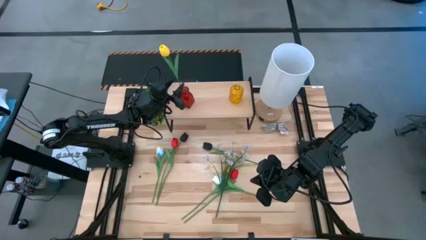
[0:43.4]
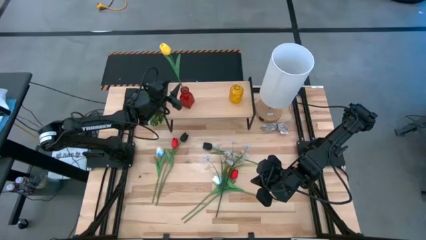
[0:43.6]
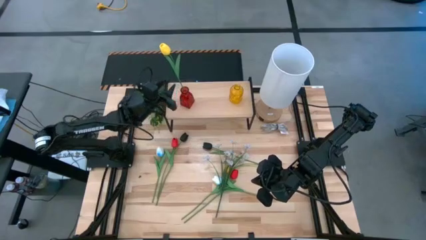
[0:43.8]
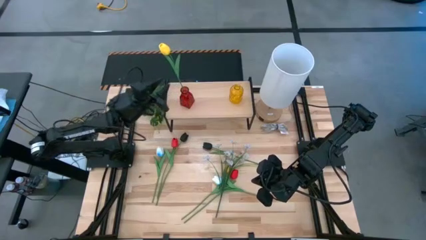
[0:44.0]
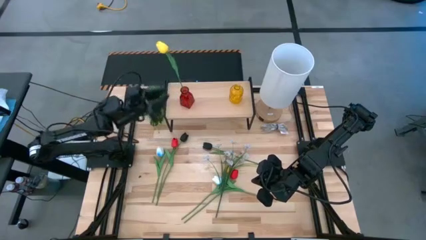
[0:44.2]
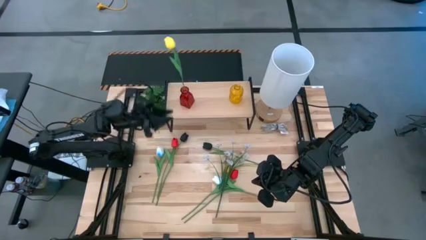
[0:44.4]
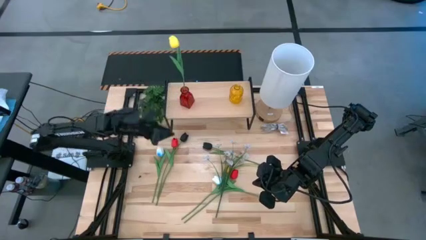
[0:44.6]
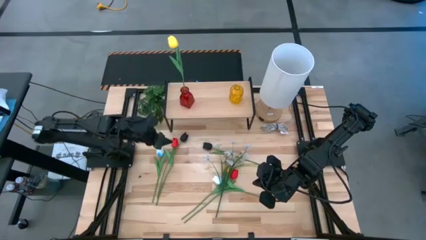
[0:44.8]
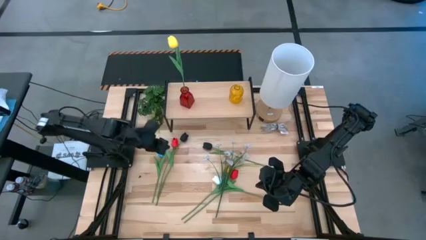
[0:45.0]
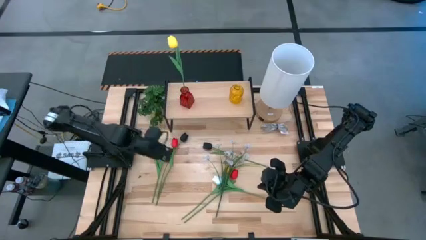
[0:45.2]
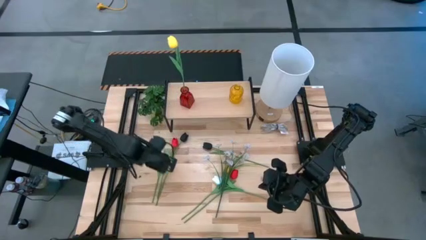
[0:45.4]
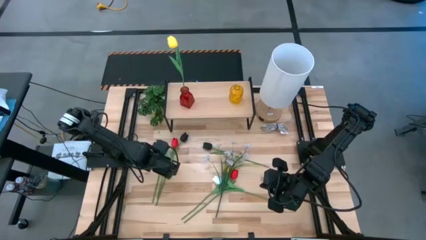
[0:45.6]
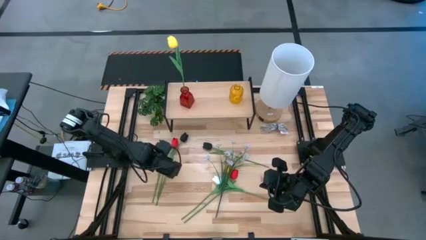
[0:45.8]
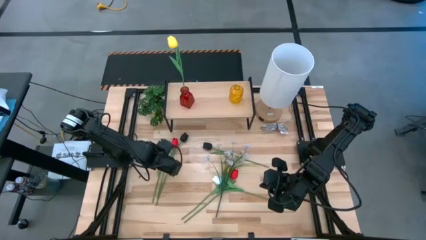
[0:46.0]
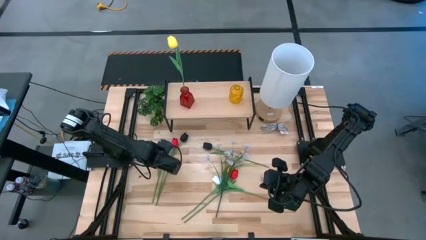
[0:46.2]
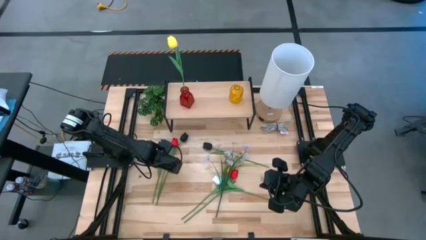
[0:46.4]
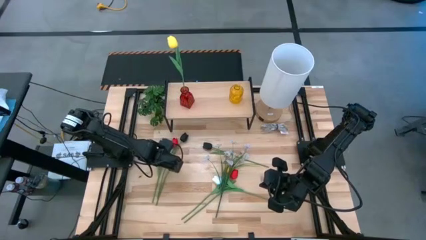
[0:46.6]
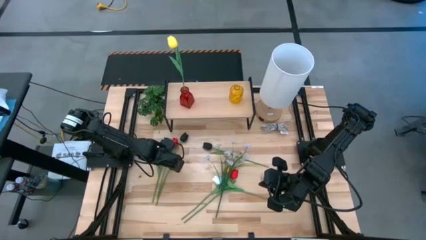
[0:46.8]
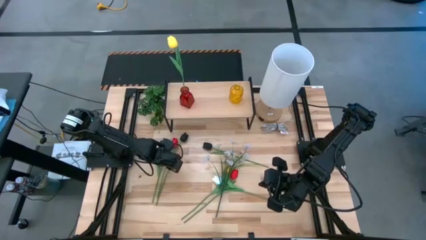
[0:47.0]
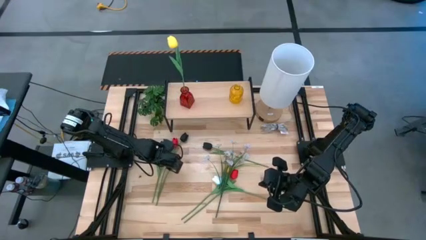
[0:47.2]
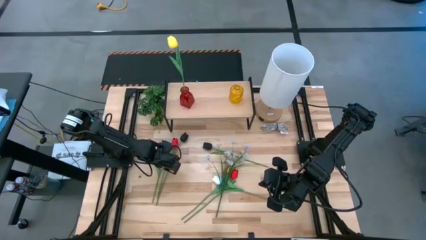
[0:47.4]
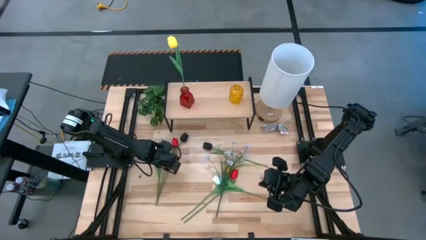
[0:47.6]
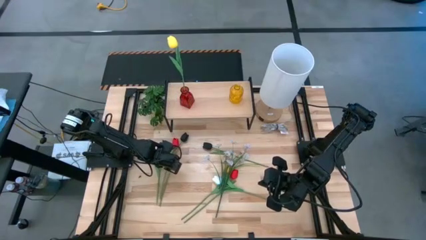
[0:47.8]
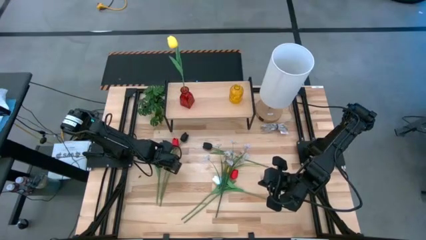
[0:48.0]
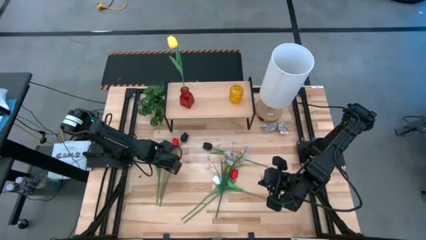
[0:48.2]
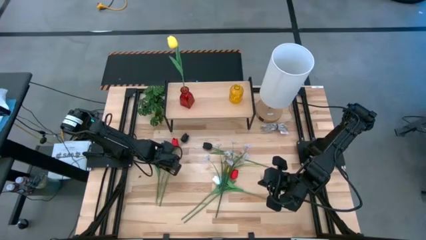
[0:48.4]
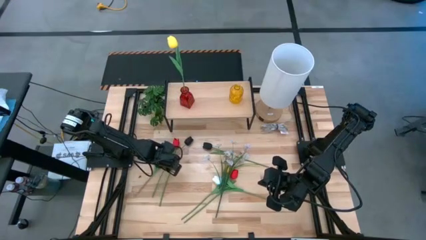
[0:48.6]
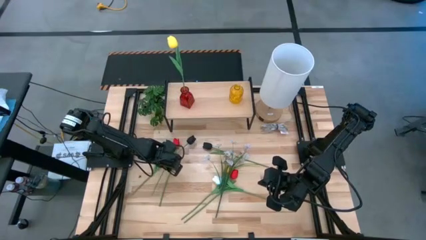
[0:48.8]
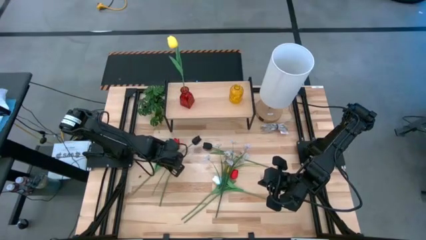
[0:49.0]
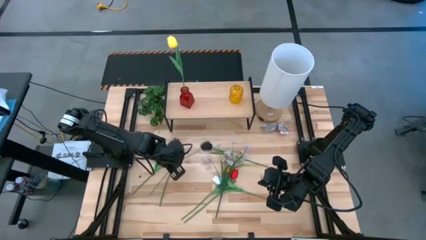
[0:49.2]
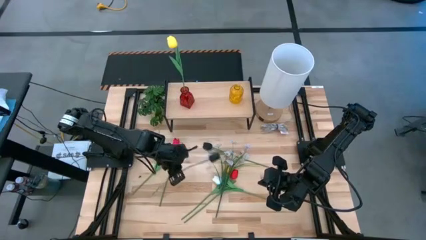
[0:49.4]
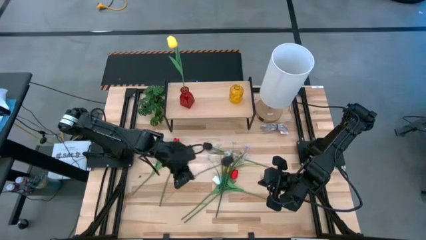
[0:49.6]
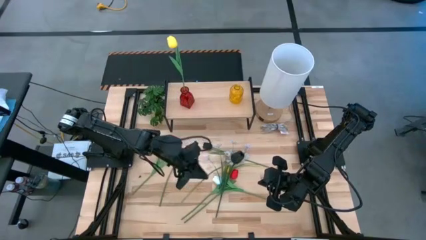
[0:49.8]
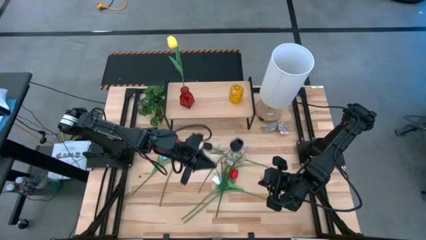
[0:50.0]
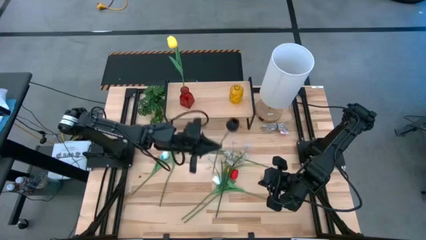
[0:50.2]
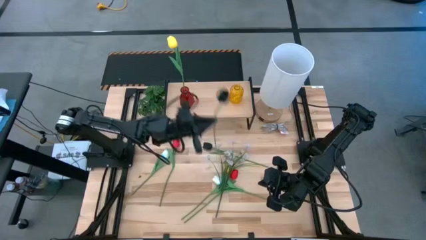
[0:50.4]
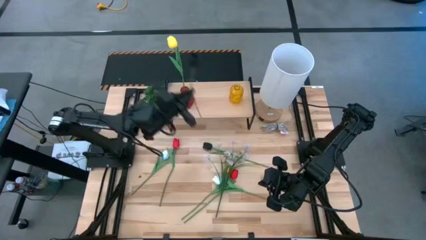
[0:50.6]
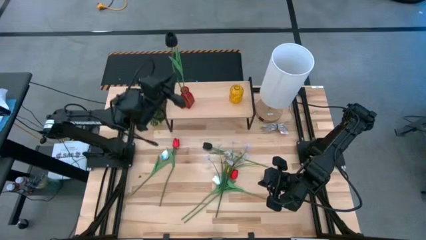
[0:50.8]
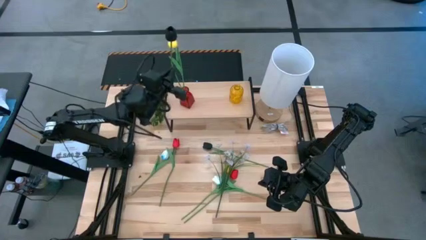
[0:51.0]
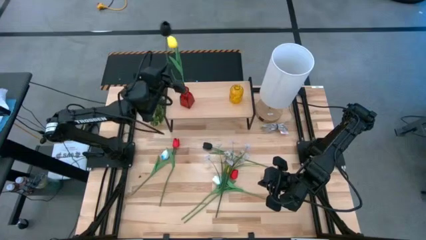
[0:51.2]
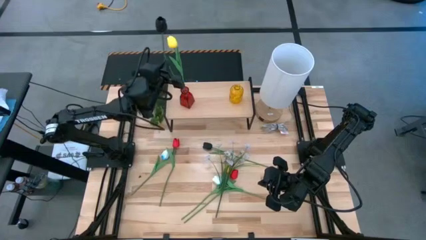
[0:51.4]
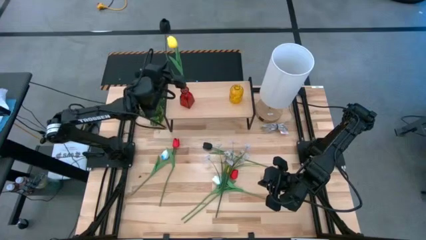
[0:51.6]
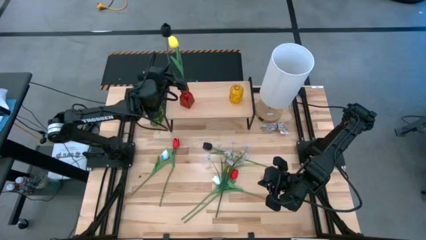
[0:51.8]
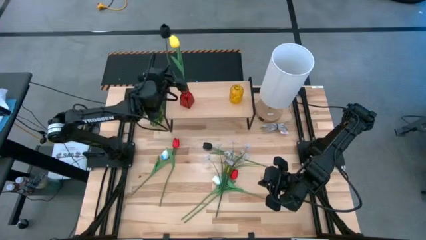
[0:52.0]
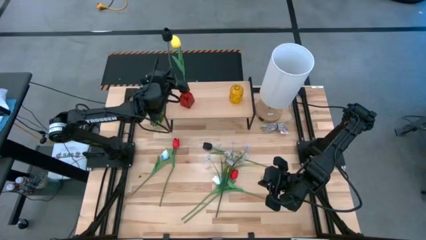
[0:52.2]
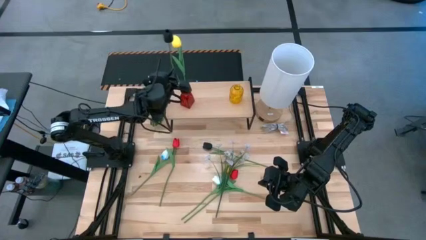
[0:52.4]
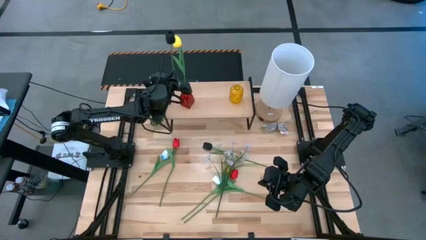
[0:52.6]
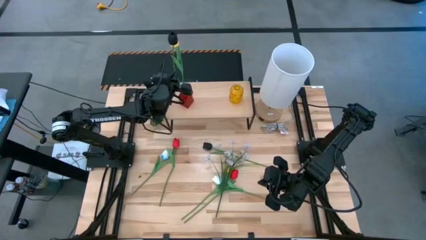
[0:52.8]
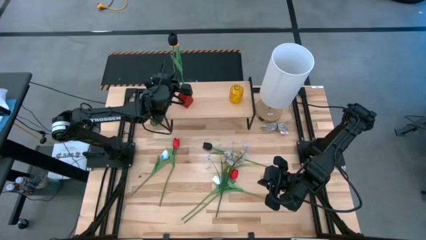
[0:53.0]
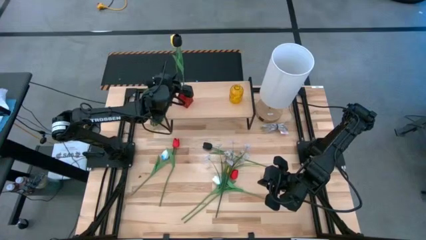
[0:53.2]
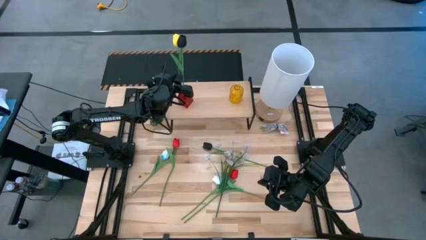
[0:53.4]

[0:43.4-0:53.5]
Task: Pick and place flowers into a vace then onto a shelf
Put the left black flower into the red vase on the shelf
